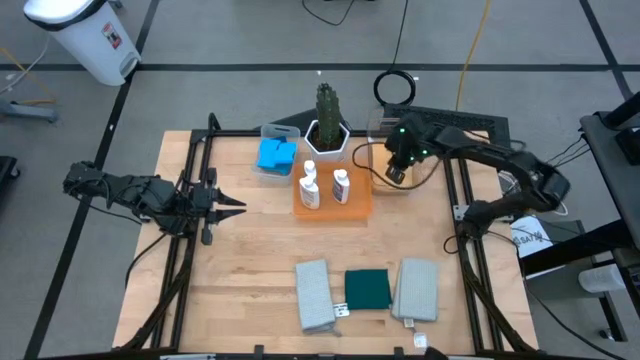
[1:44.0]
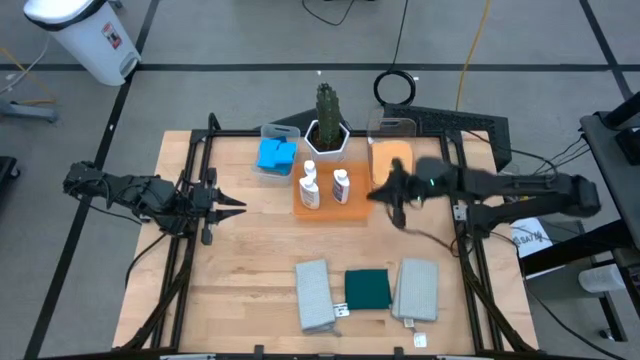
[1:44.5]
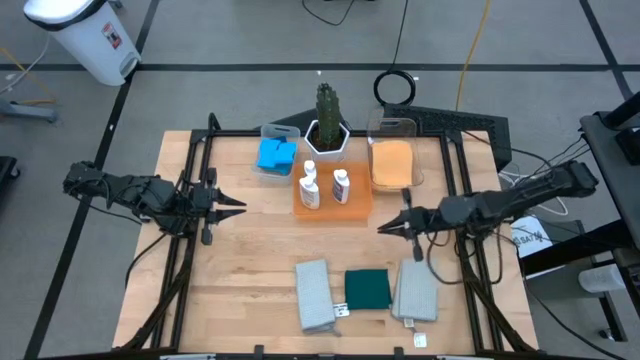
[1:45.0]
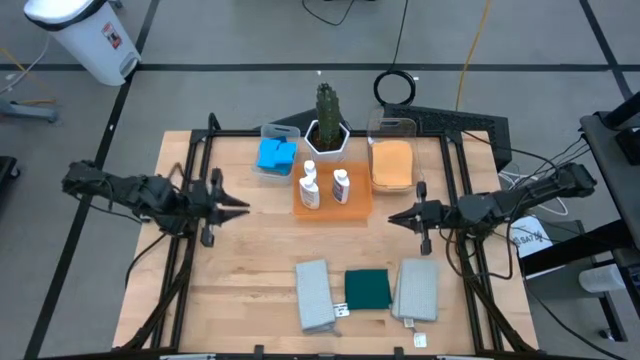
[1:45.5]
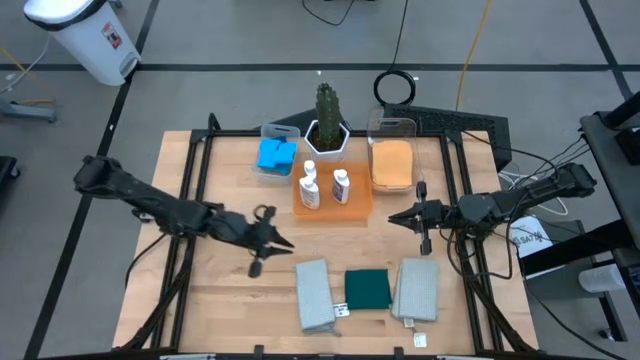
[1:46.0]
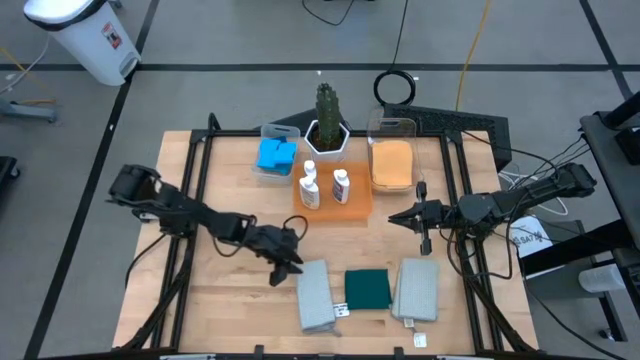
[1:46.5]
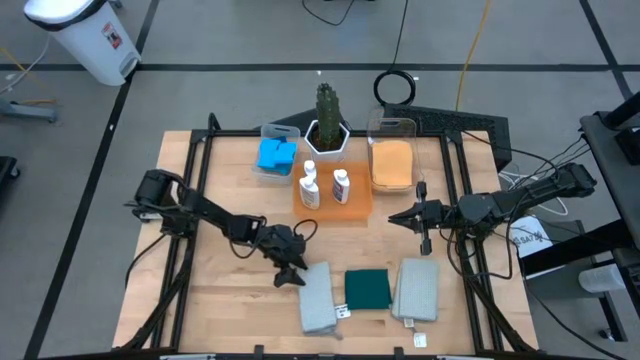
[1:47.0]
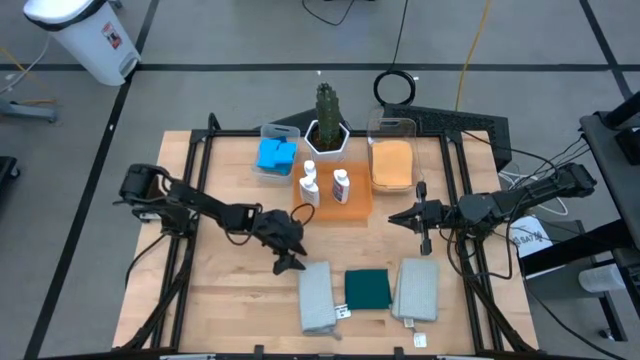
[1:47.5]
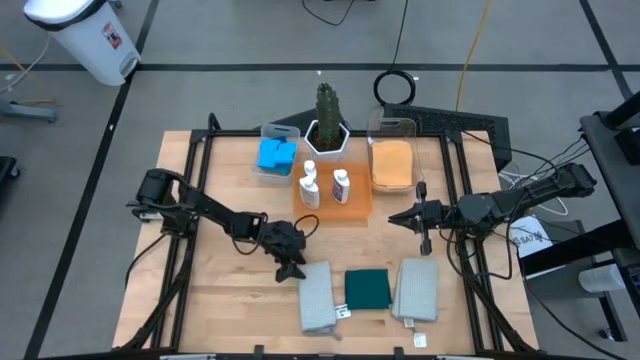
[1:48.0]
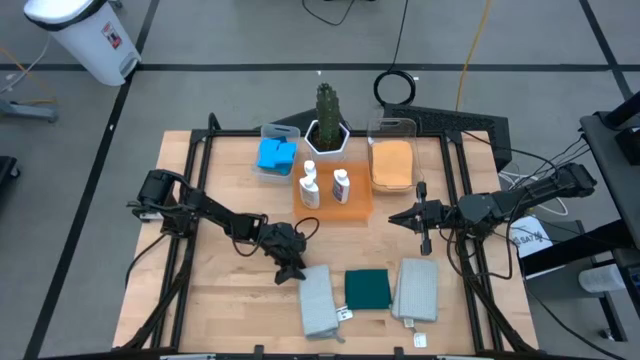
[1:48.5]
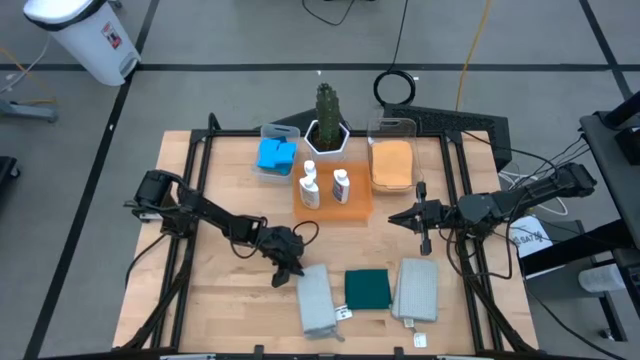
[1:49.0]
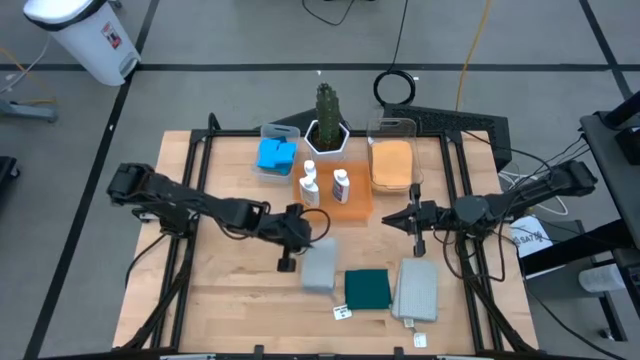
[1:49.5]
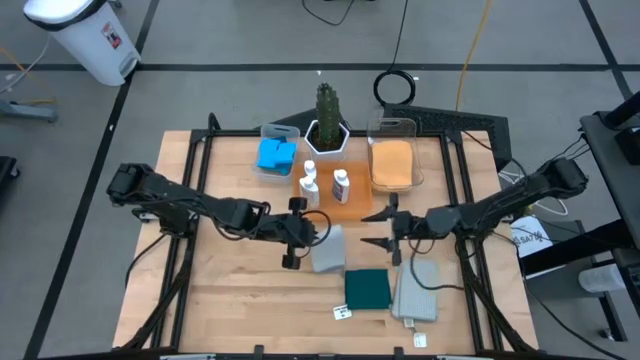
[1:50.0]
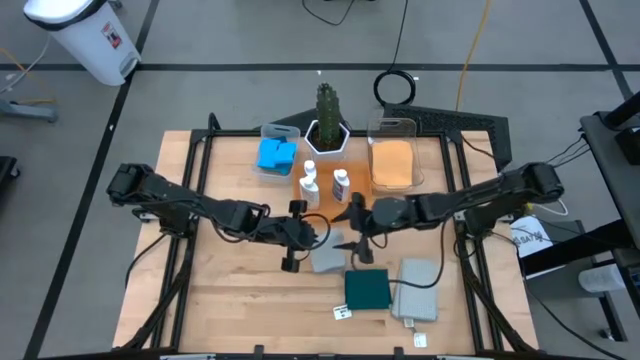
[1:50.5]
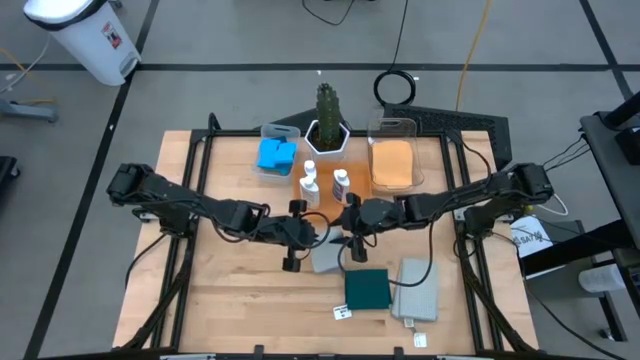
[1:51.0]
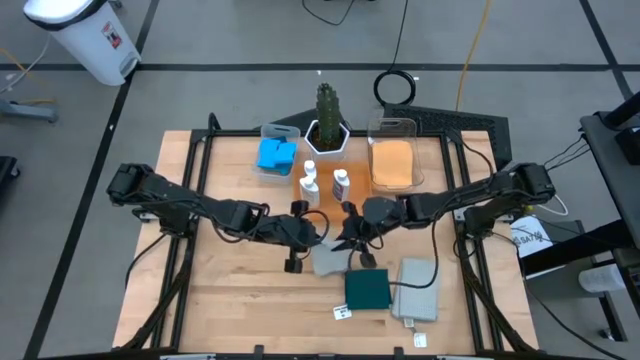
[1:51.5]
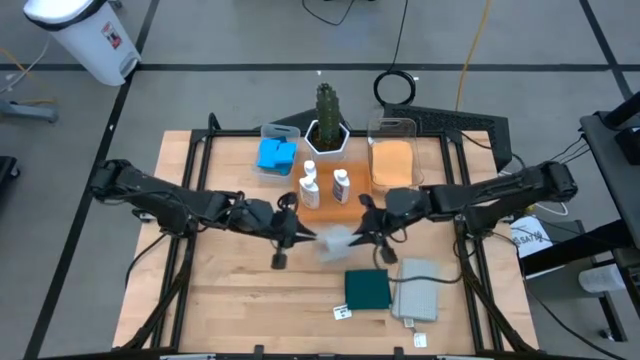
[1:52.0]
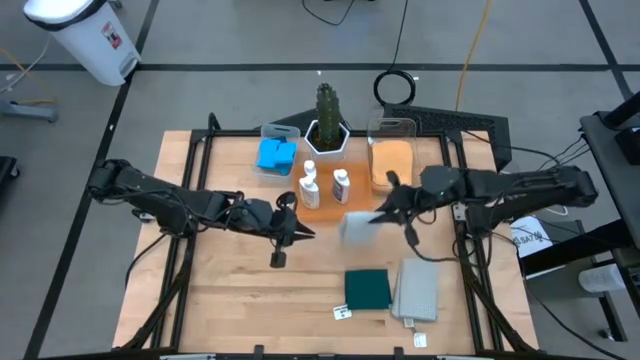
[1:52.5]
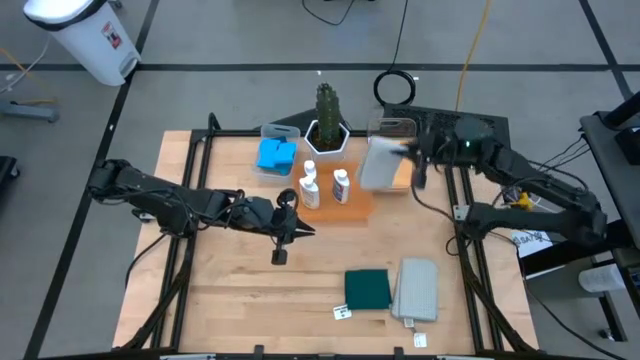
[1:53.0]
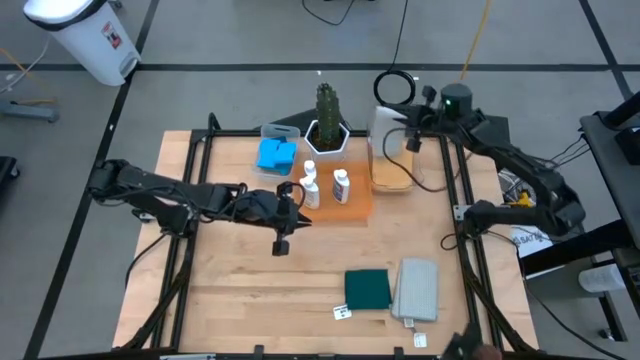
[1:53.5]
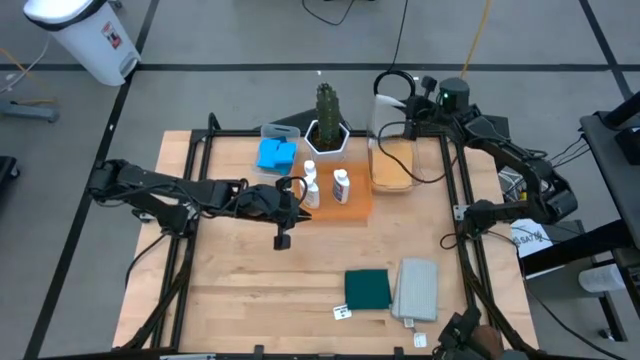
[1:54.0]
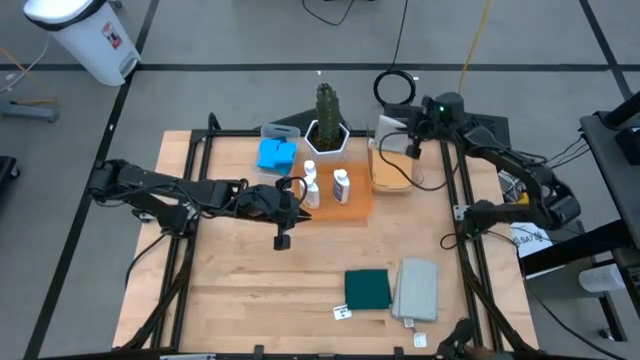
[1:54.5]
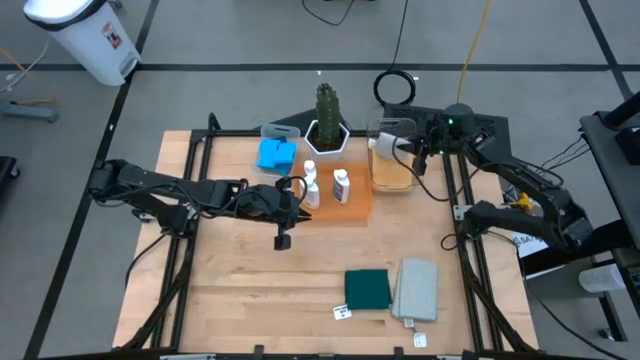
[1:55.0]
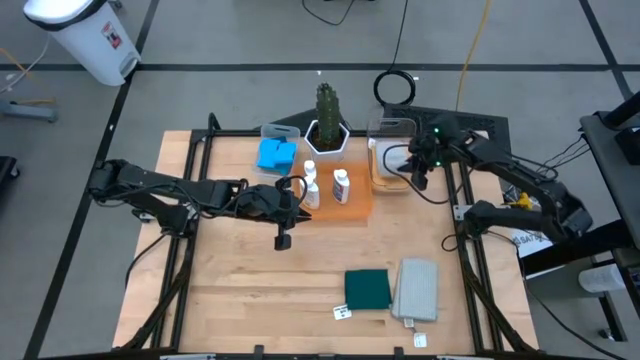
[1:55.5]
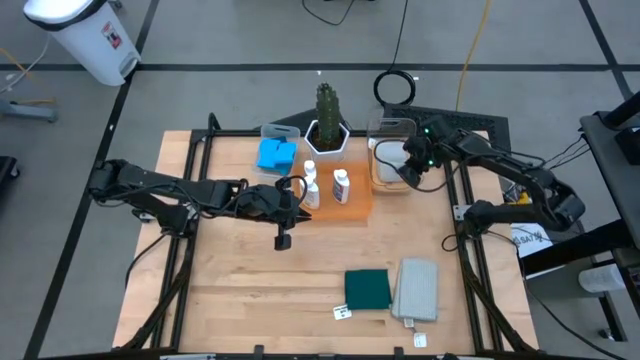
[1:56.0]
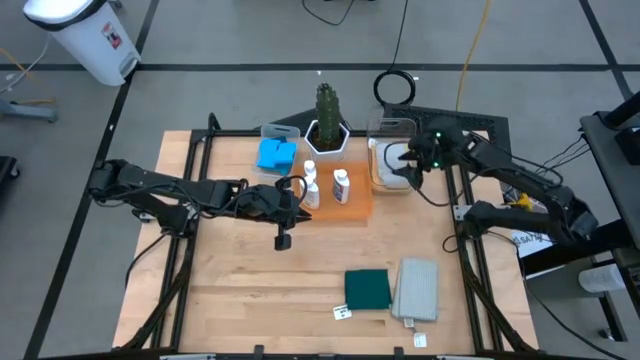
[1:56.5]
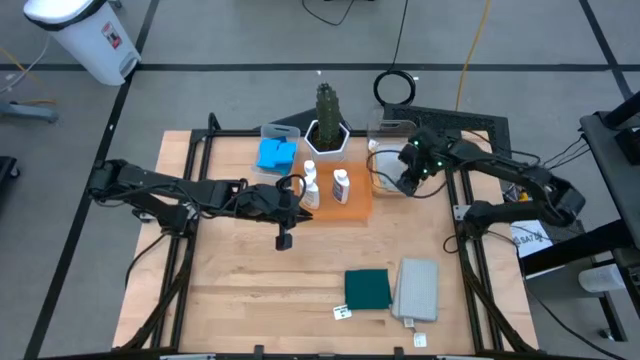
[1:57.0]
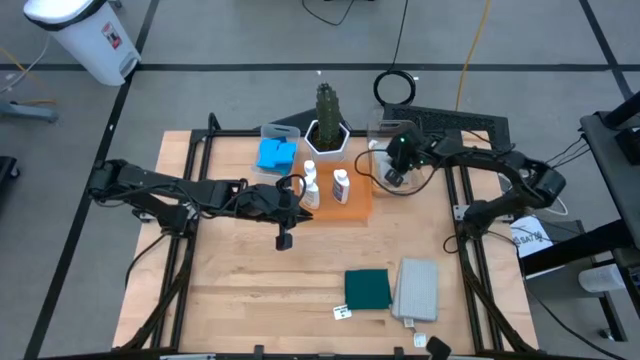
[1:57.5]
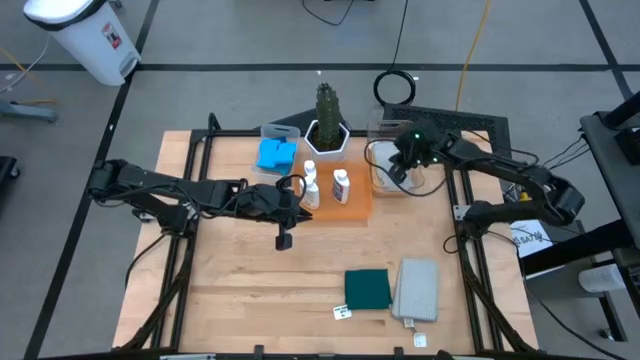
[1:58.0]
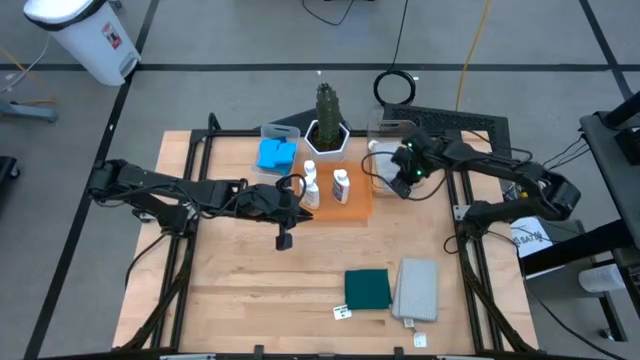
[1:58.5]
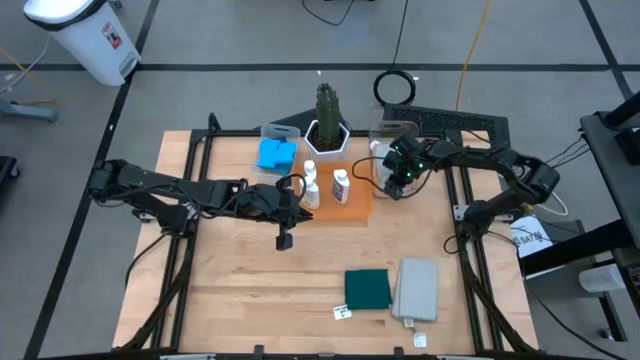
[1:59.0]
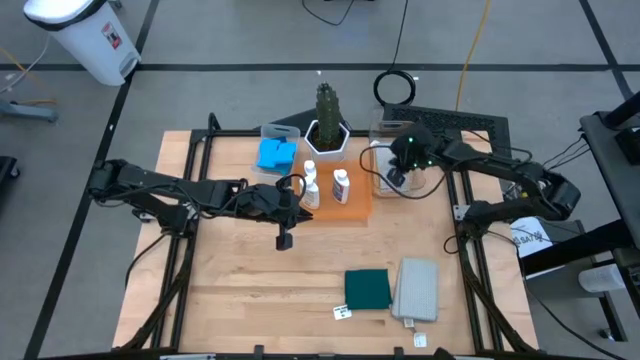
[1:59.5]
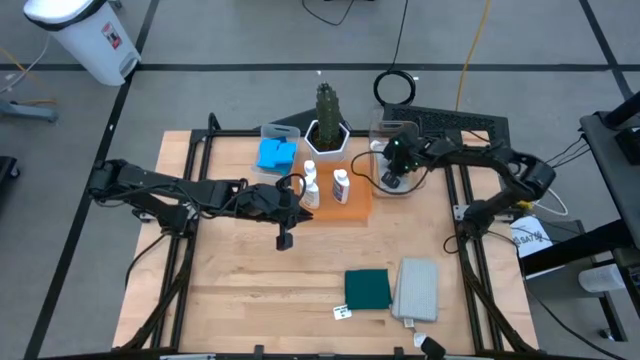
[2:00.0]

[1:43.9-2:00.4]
Task: Pick & Place Kitchen Items
Put the gray microfiber towel into the transparent bin

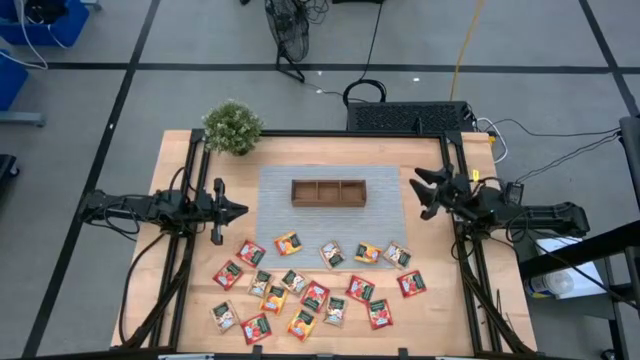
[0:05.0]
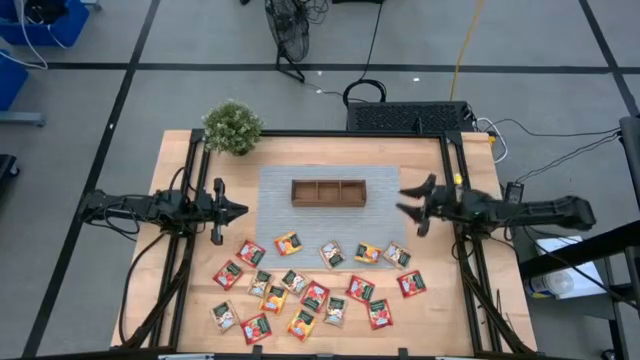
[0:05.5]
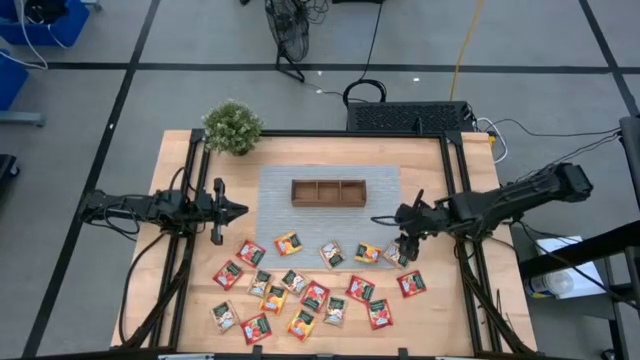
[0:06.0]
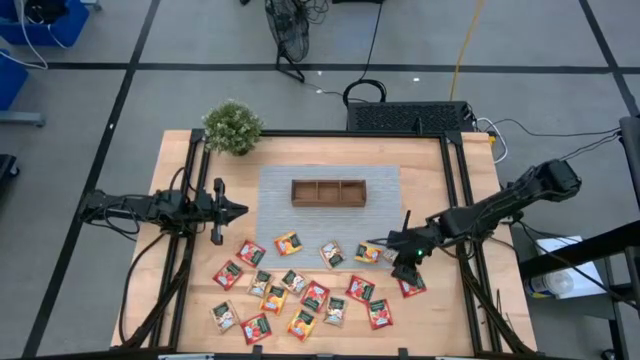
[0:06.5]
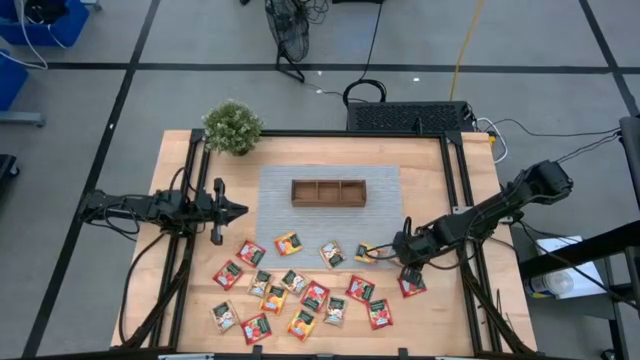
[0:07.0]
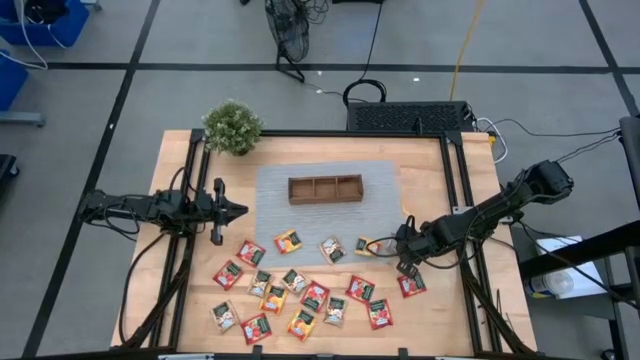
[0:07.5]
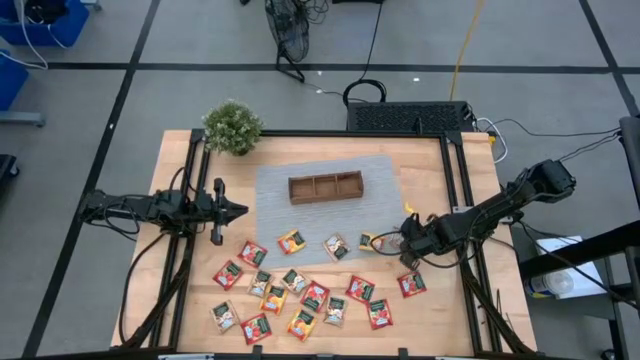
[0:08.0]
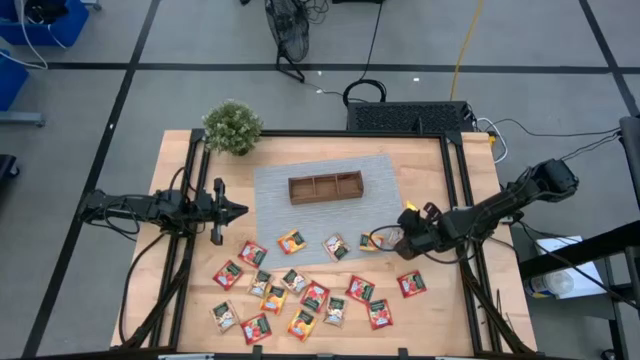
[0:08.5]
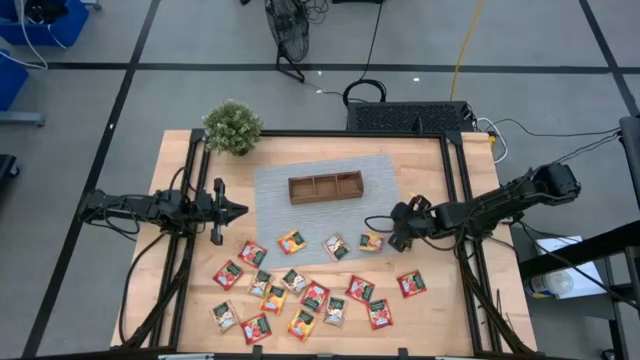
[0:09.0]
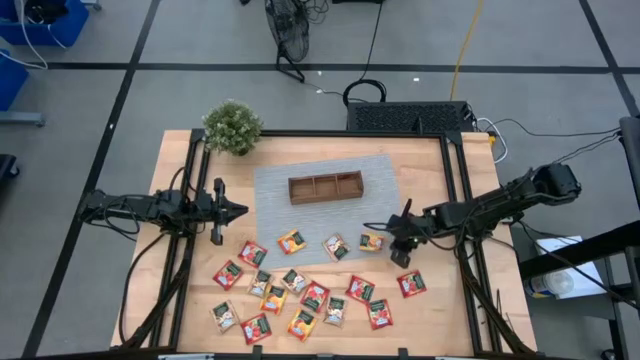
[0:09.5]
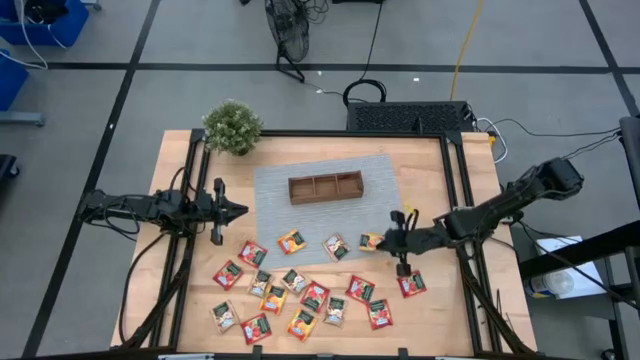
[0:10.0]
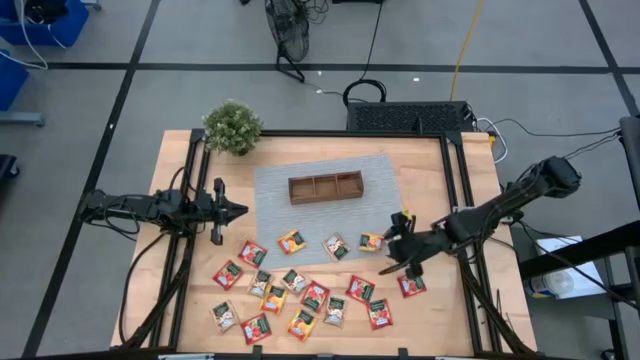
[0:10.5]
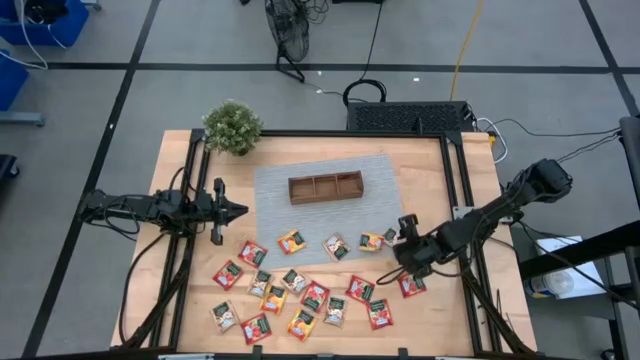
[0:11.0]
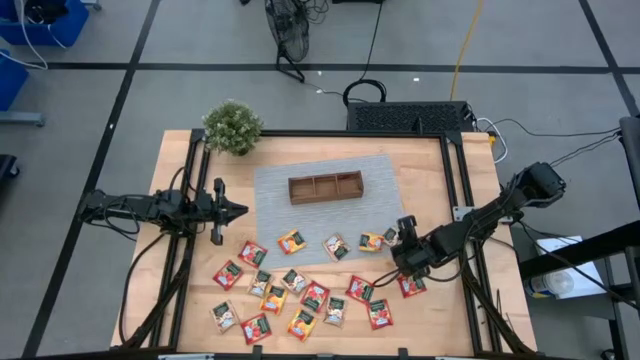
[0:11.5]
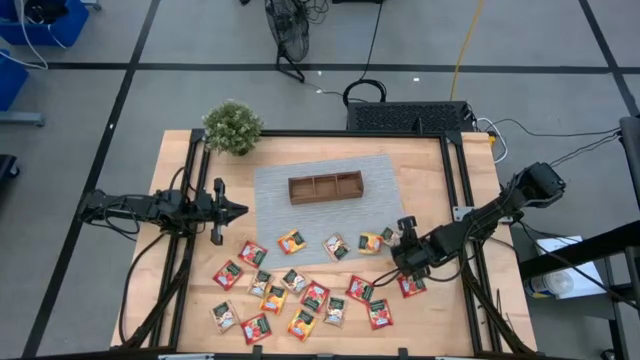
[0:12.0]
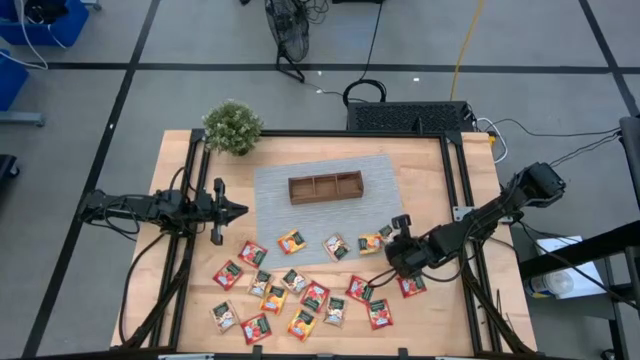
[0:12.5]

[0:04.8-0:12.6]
Task: Pick & Place Tea
Put the brown tea bag into the middle section of the wooden organizer
